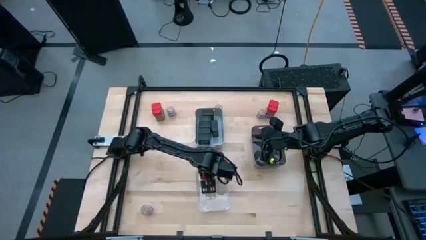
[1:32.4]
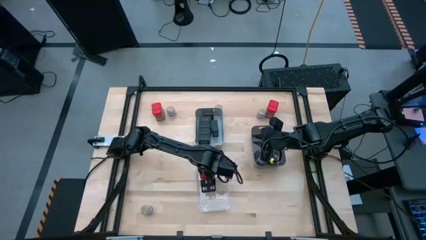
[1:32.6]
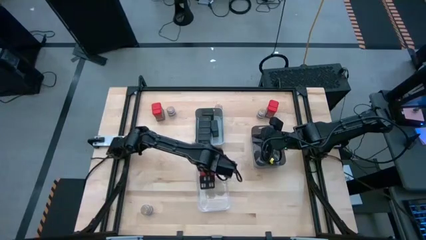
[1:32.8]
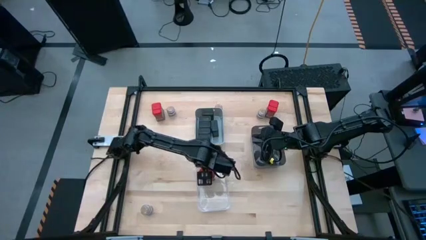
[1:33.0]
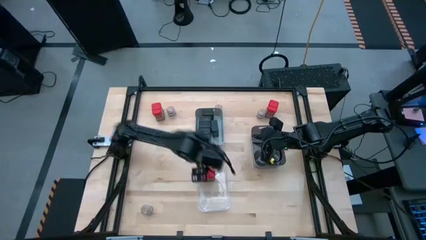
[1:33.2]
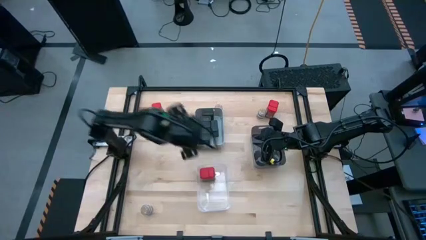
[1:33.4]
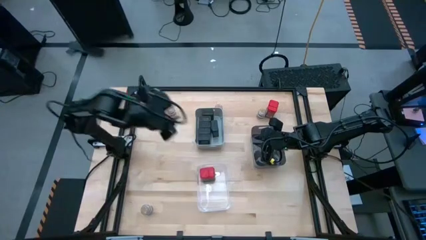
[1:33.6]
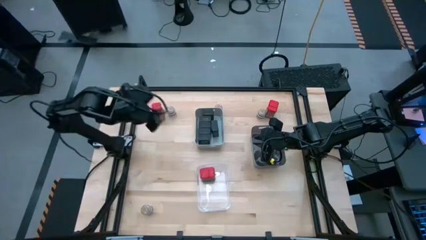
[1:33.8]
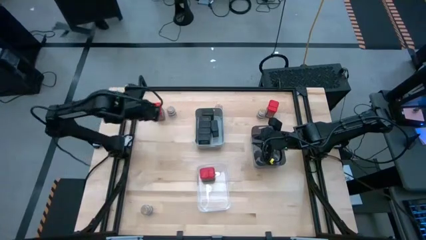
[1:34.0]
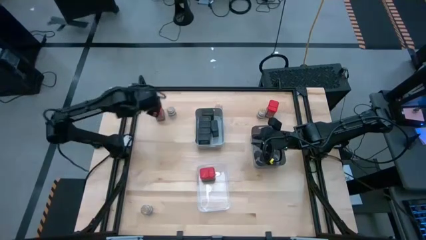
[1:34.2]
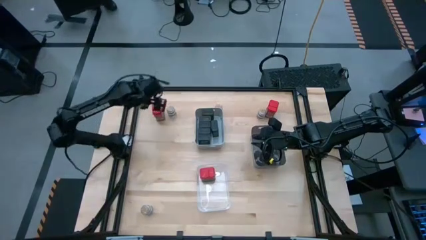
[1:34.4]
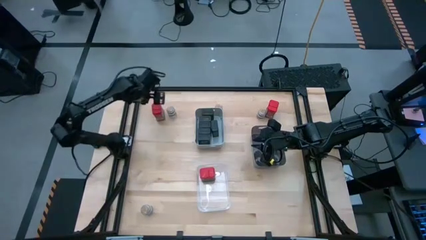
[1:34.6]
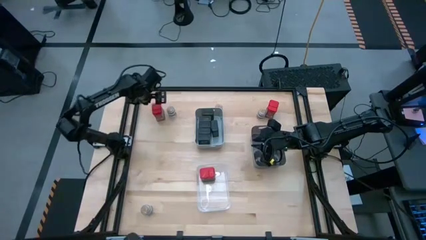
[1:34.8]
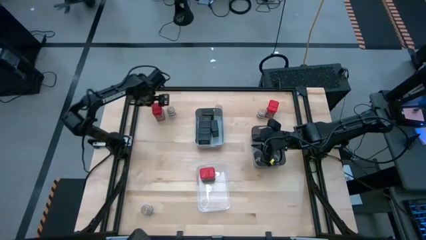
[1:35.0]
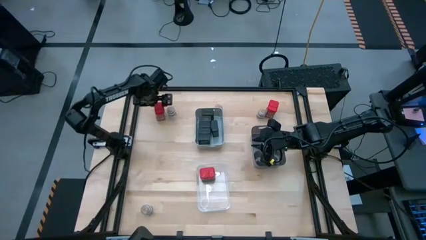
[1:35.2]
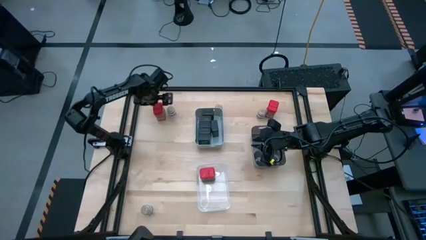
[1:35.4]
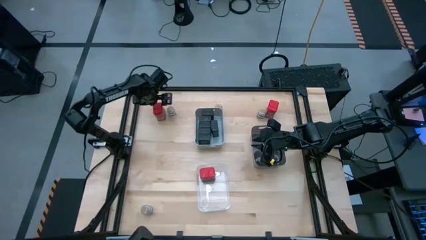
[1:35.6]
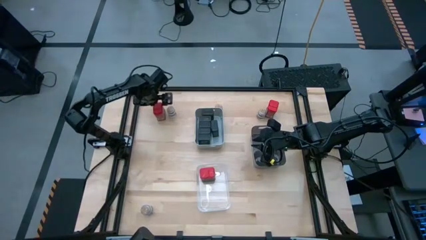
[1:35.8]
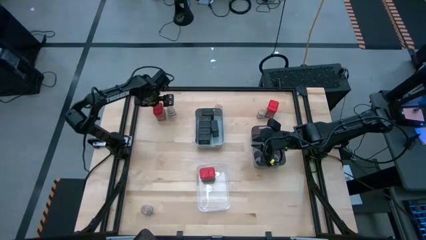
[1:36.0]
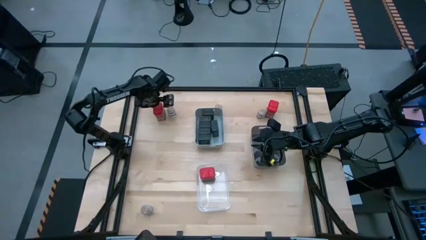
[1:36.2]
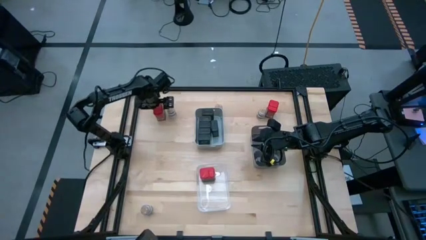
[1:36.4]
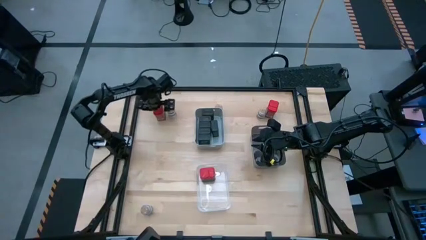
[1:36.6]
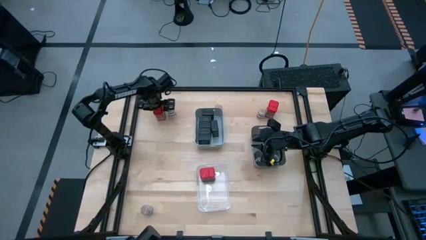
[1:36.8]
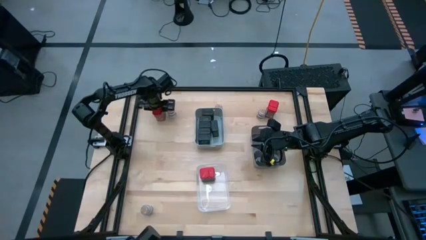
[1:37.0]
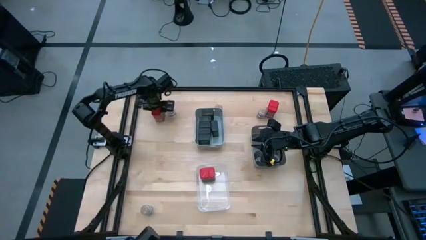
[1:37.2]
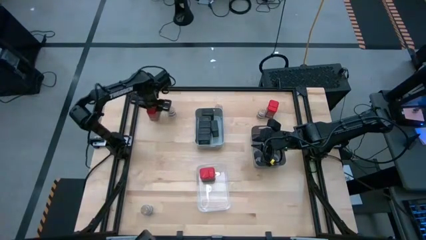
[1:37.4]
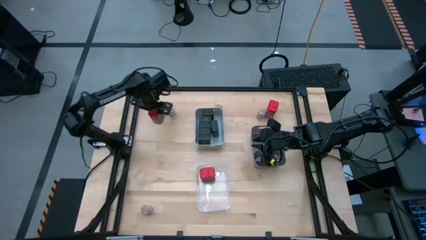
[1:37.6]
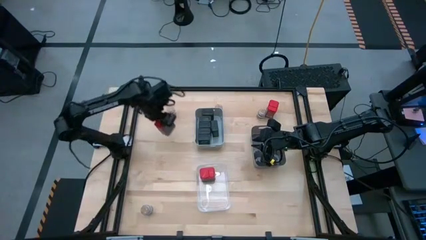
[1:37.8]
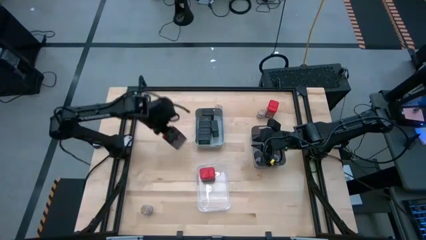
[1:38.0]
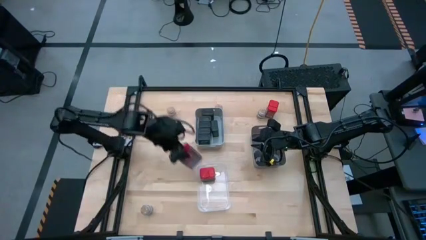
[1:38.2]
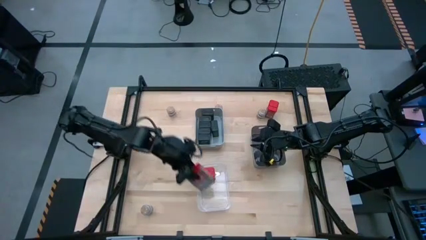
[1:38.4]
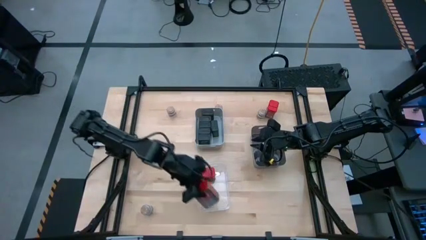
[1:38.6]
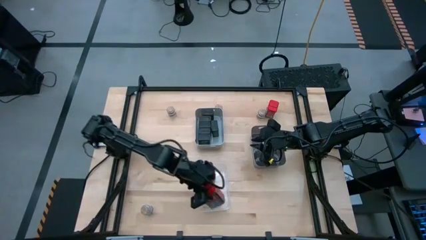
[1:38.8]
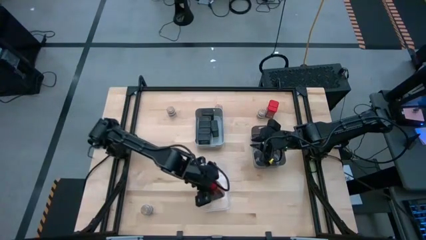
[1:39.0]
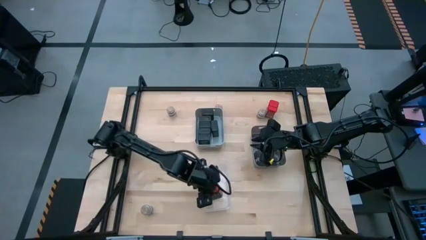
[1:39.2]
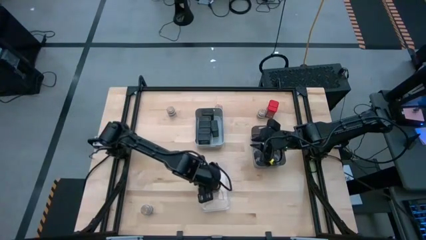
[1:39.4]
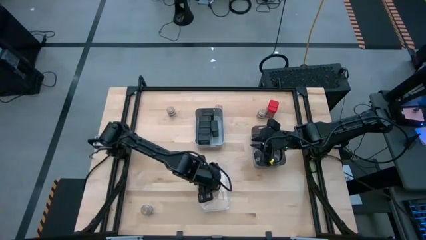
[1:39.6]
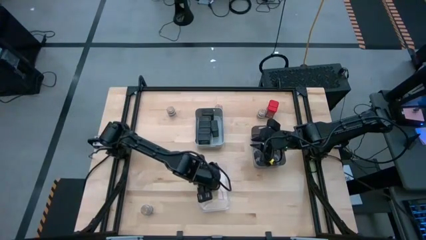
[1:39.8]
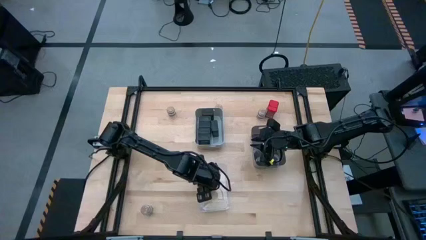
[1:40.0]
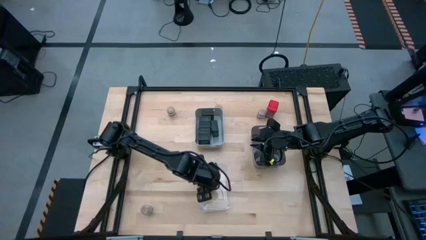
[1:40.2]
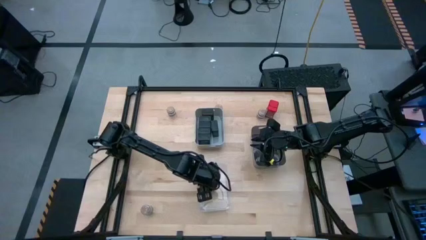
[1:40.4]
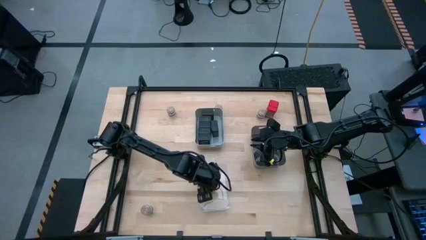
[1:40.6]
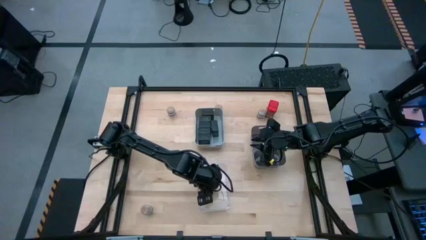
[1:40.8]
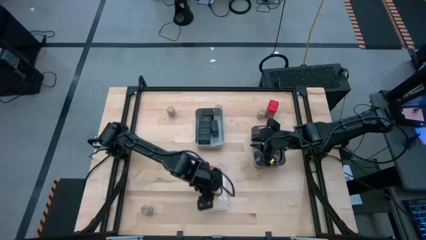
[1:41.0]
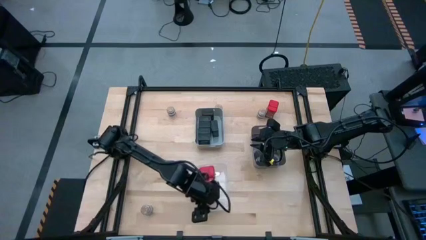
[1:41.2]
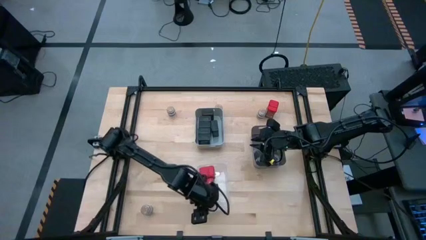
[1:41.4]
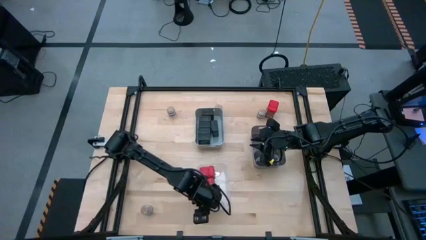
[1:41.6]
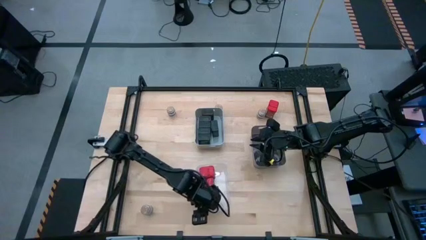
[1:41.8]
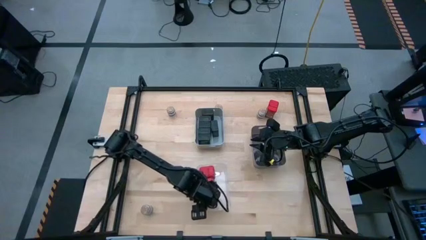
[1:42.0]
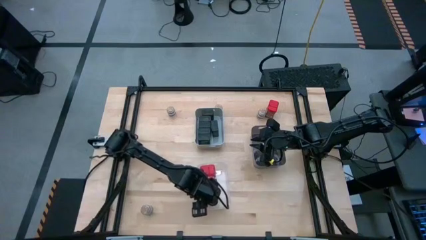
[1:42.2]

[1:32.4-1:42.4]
Task: Sort spices by type
Put the red spice can into the transparent bin

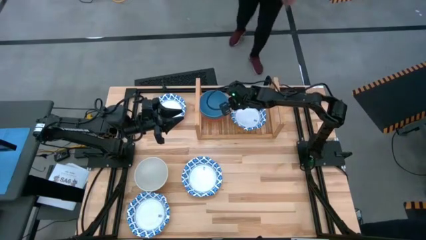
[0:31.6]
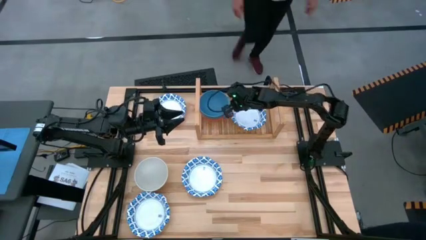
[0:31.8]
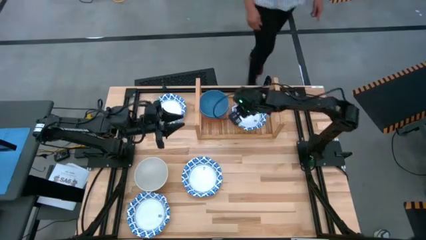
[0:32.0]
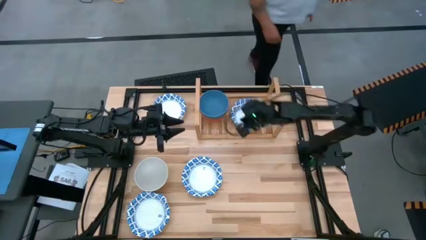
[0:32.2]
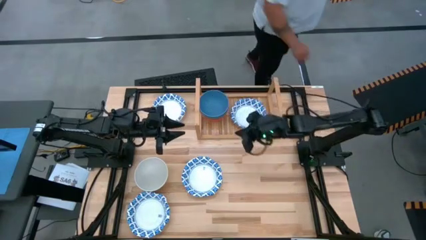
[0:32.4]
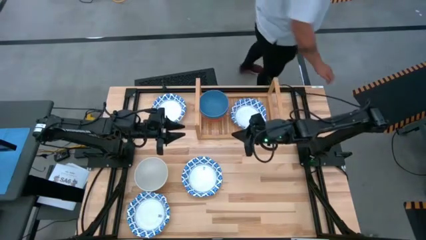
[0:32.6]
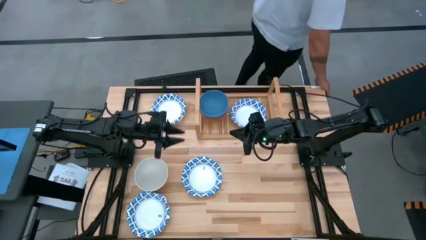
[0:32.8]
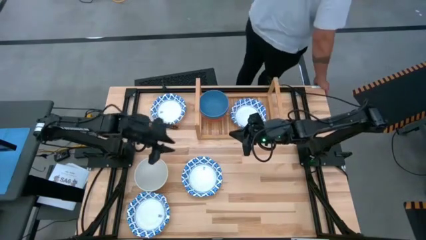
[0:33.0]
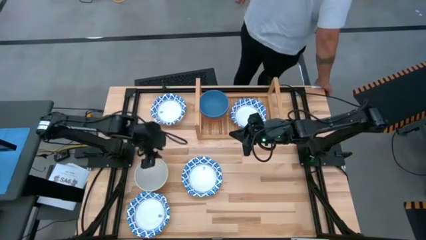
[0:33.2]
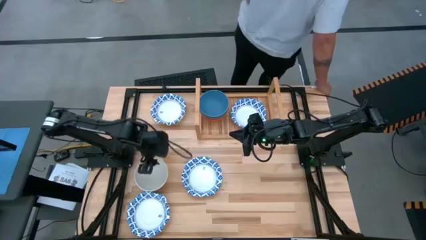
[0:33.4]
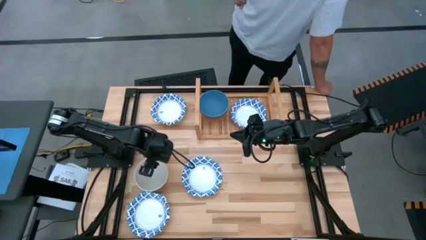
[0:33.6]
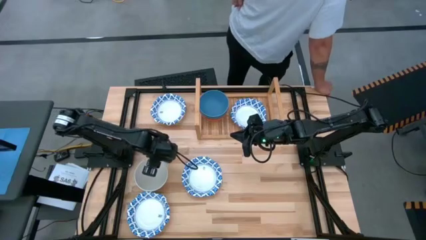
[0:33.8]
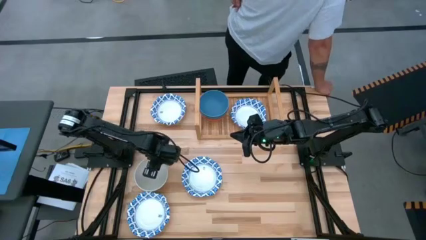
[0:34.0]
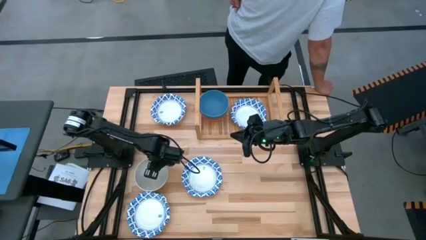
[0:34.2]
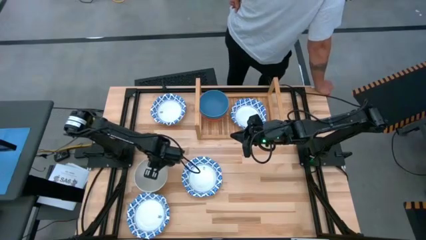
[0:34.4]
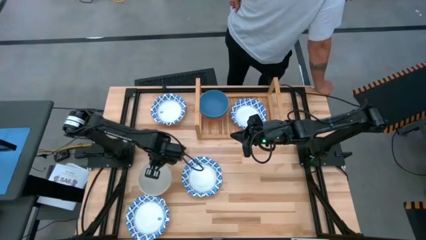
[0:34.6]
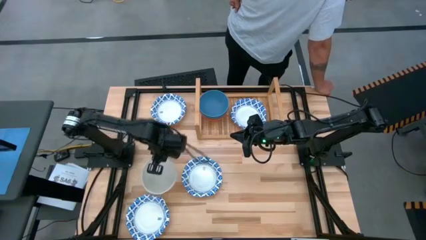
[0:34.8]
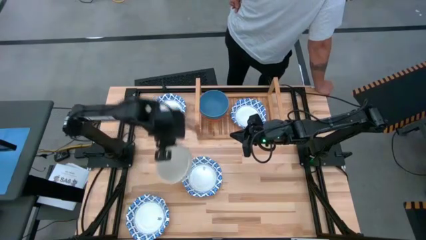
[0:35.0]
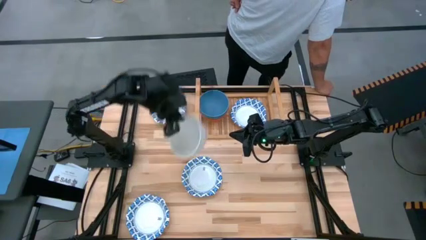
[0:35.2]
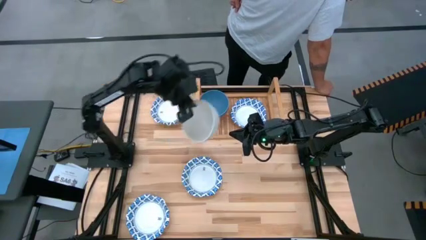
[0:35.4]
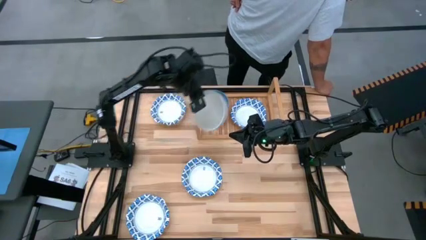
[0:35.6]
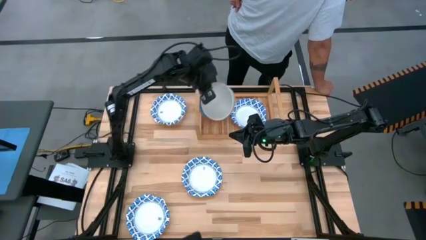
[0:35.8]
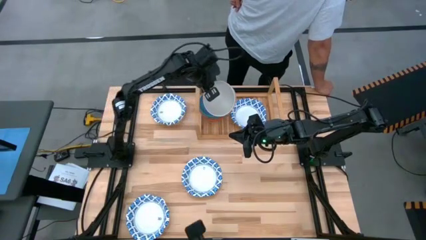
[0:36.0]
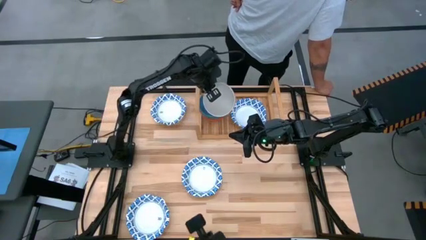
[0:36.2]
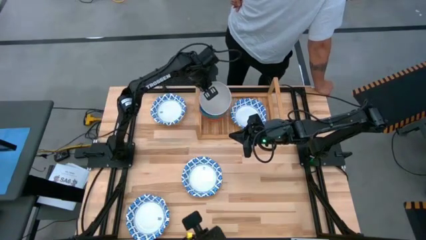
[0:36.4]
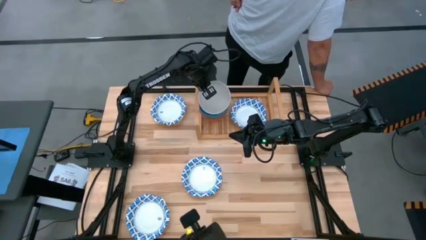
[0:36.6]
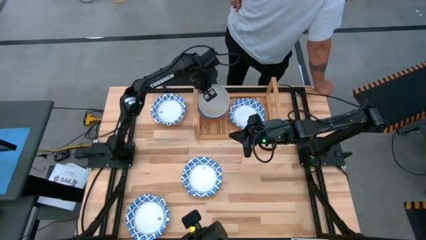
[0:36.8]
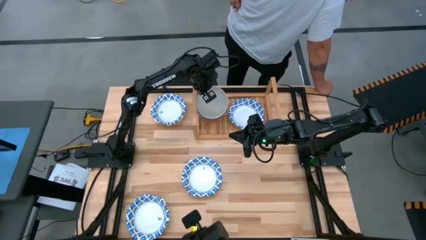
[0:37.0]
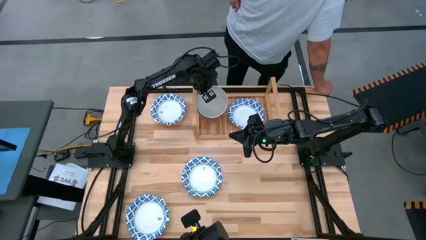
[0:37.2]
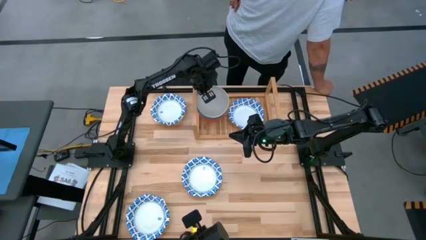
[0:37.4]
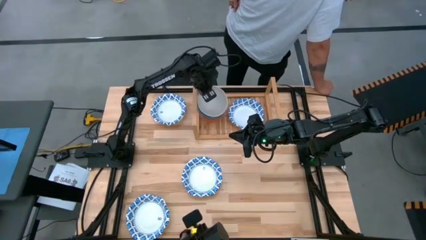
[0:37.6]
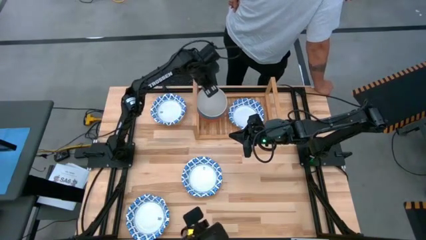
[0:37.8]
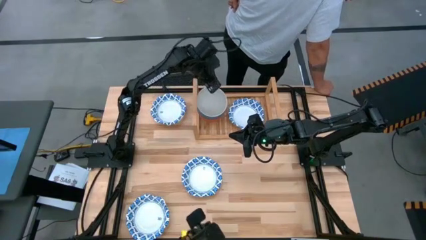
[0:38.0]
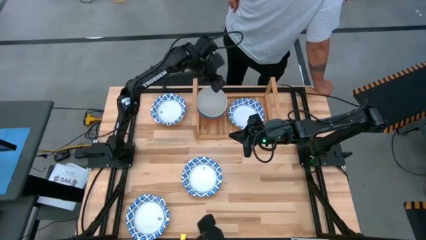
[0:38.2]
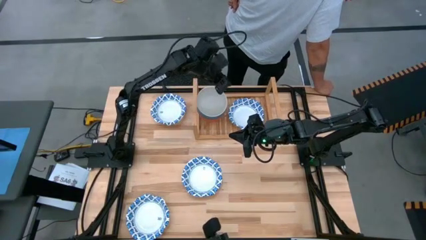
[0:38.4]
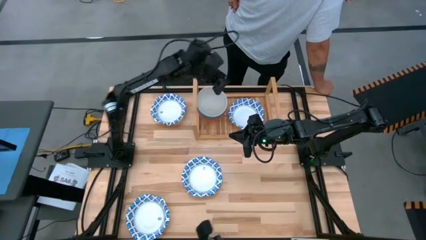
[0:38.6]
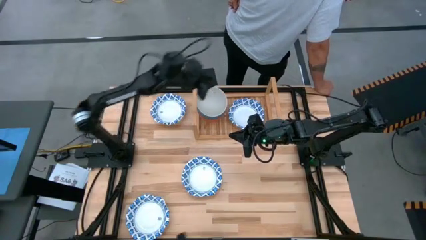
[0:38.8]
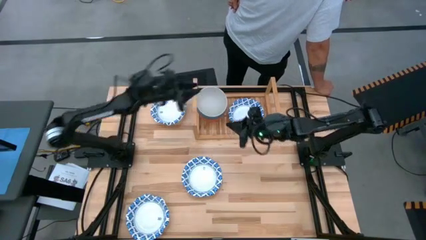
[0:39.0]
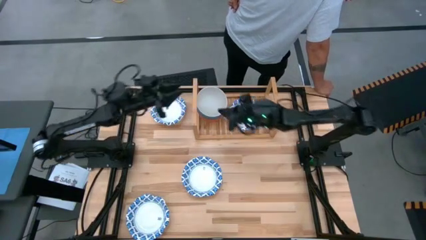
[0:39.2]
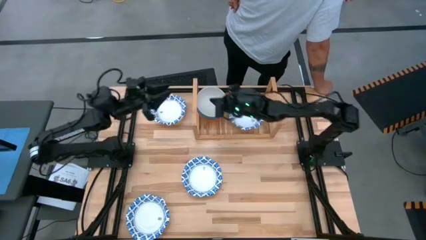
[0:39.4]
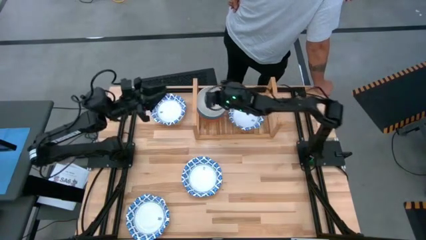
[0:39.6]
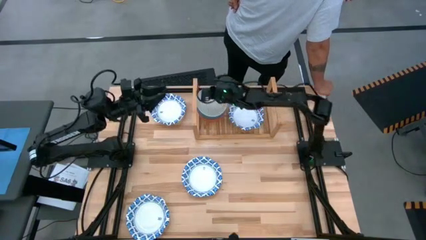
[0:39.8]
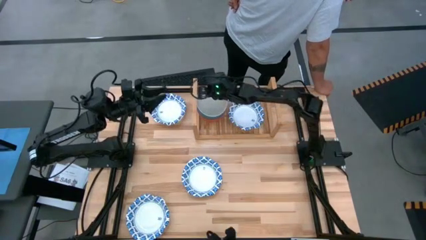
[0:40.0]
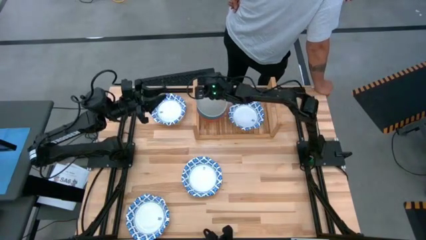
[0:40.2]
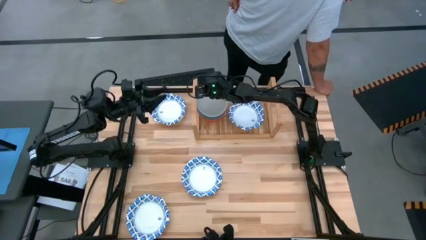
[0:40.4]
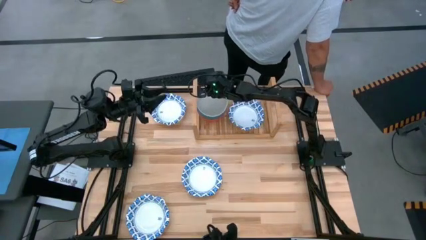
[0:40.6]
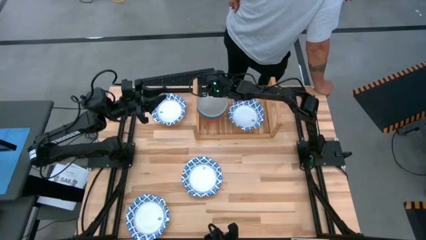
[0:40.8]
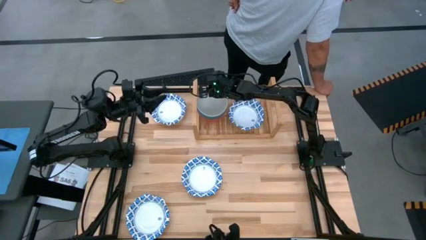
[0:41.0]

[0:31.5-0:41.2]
Task: Place and stack bowls onto a shelf
Stack the white bowl on top of the blue bowl on the shelf
